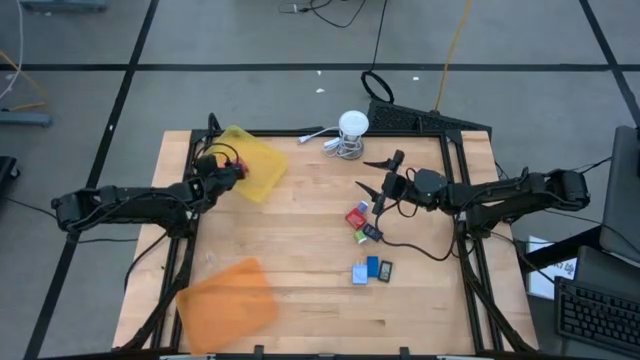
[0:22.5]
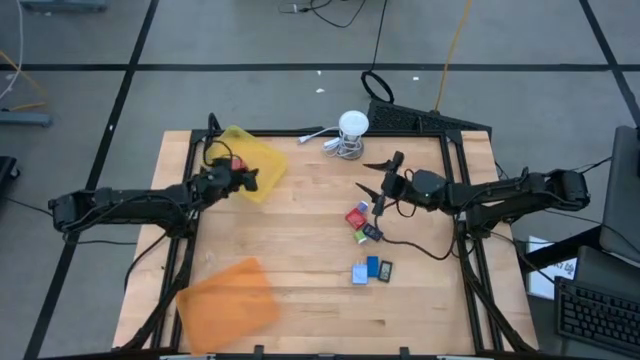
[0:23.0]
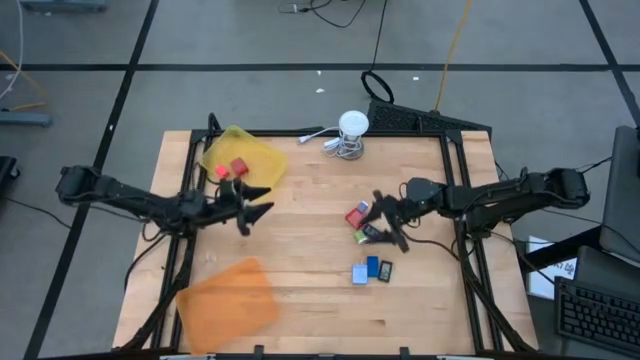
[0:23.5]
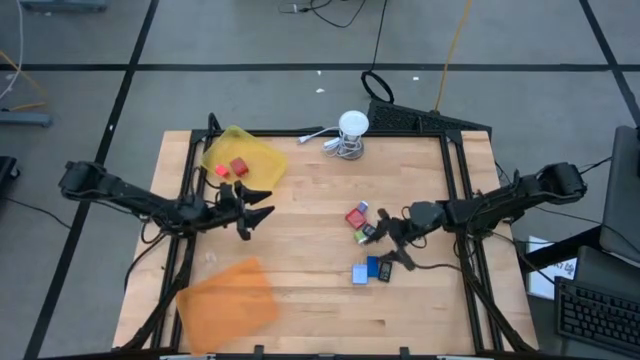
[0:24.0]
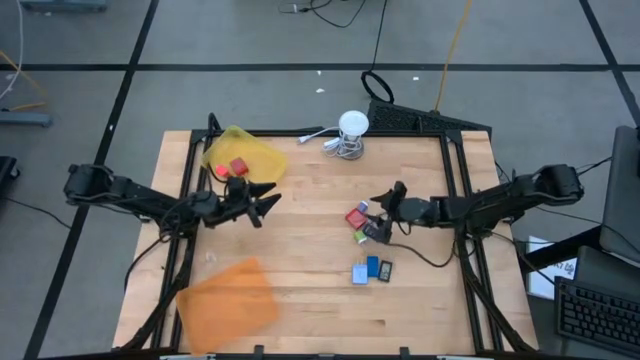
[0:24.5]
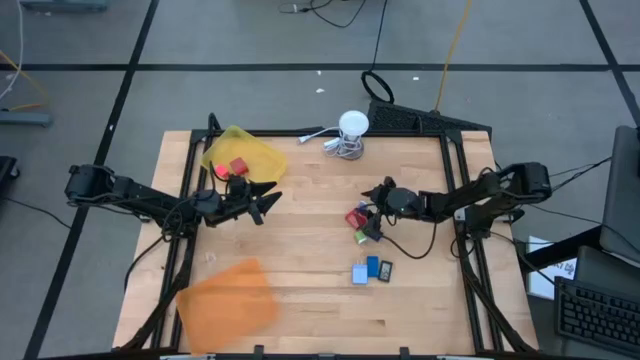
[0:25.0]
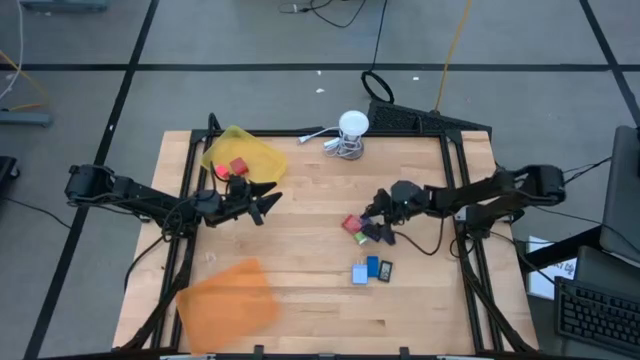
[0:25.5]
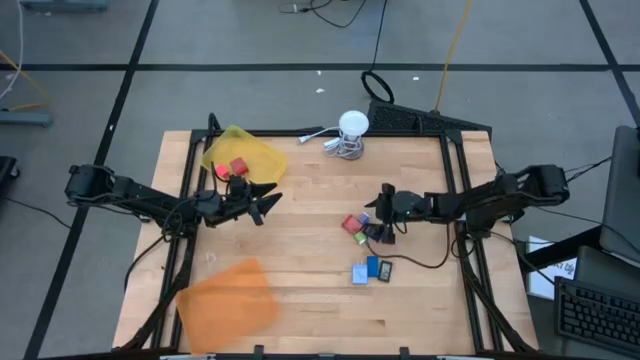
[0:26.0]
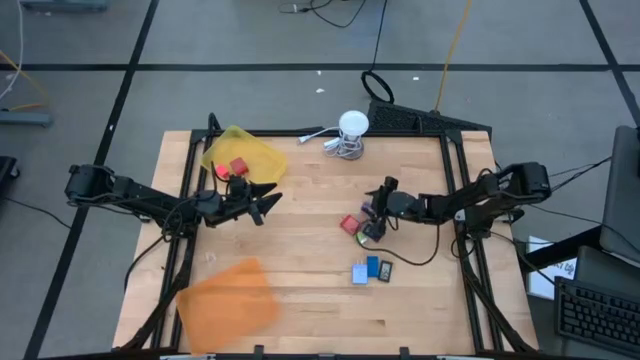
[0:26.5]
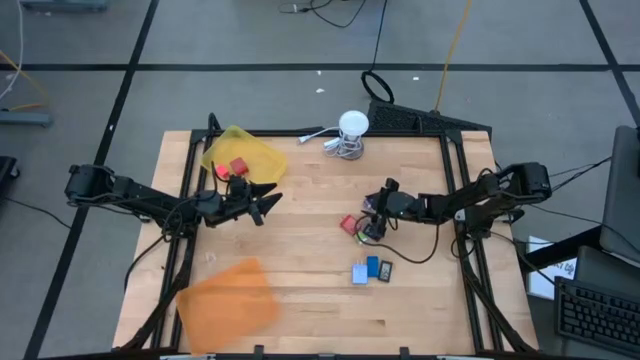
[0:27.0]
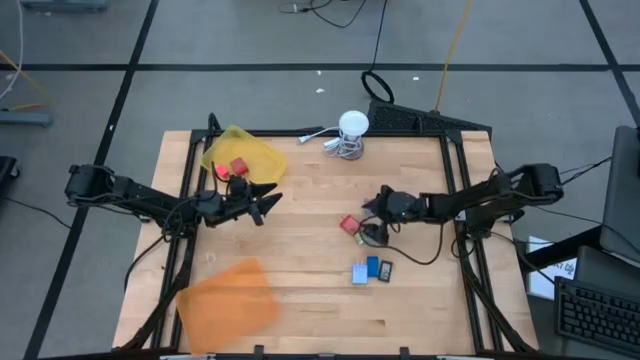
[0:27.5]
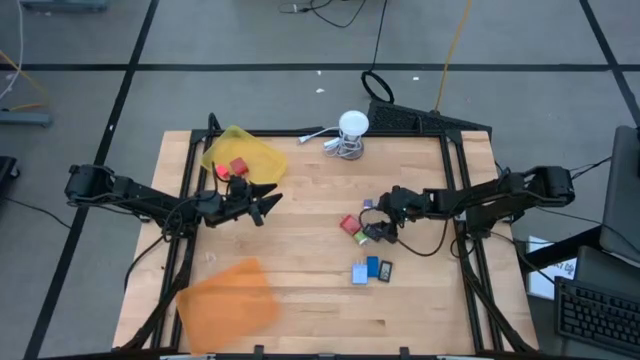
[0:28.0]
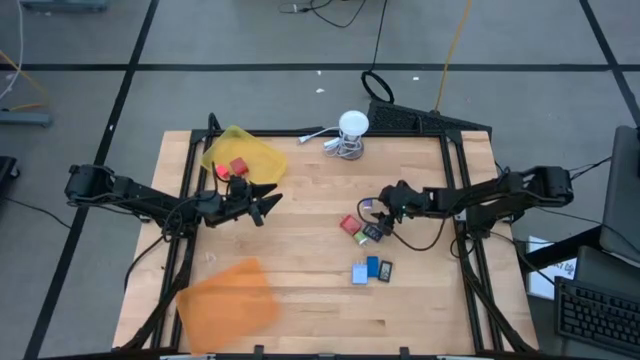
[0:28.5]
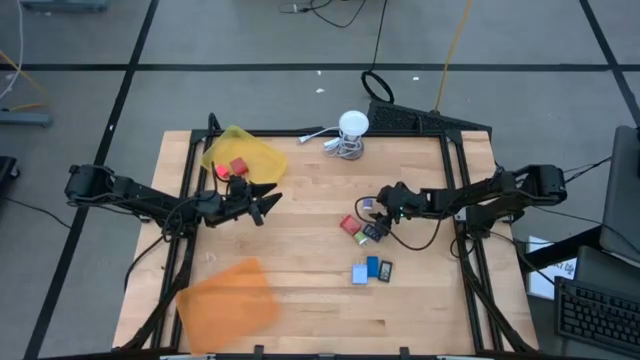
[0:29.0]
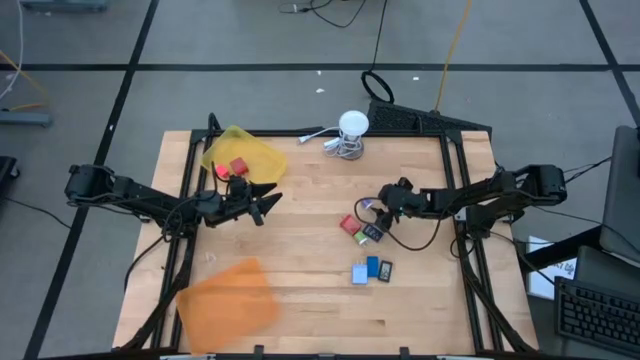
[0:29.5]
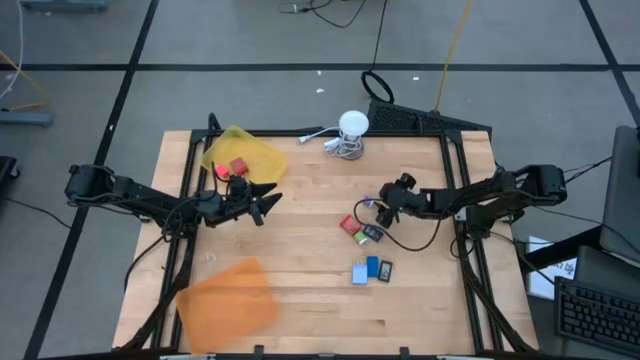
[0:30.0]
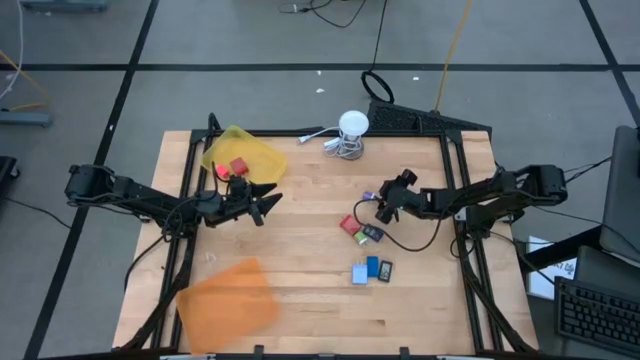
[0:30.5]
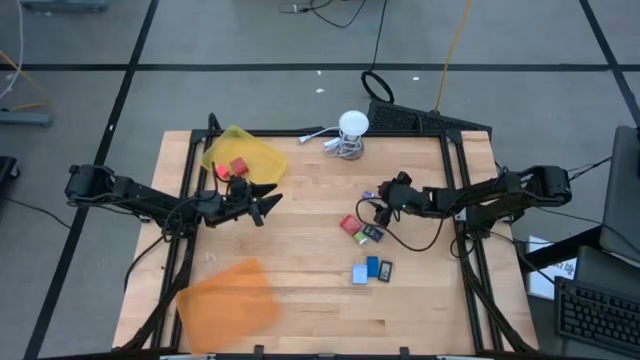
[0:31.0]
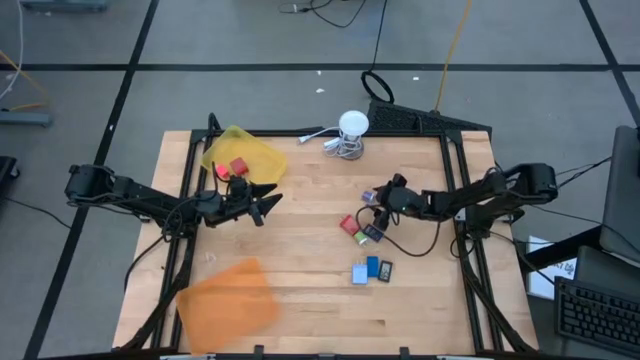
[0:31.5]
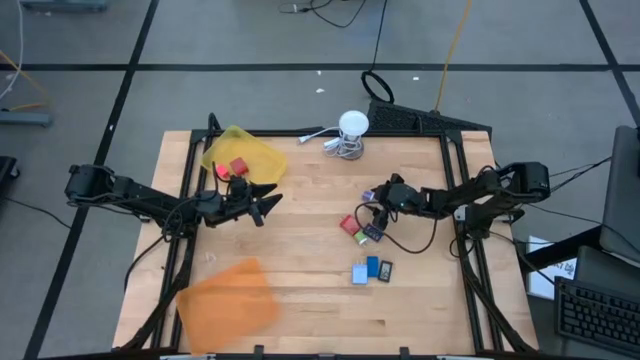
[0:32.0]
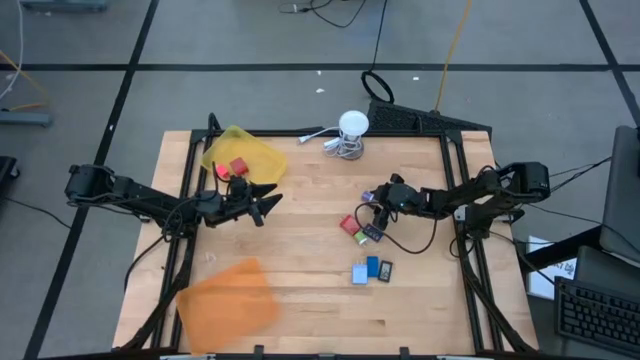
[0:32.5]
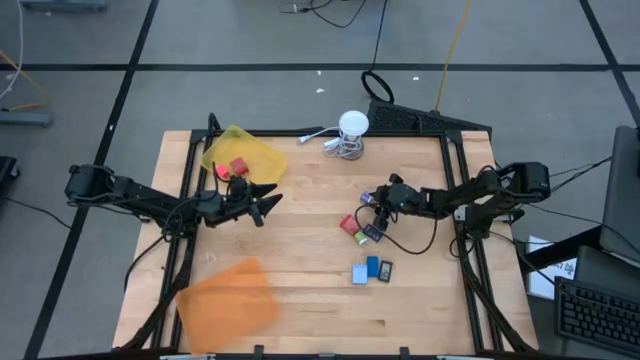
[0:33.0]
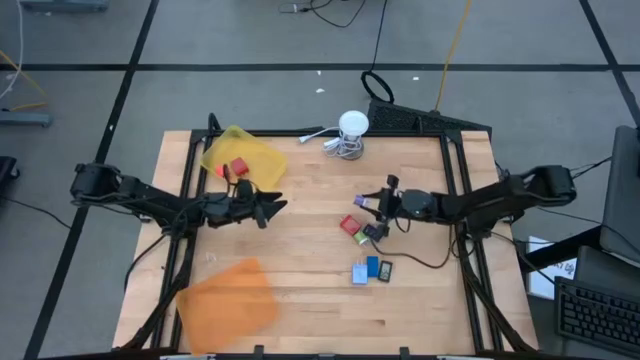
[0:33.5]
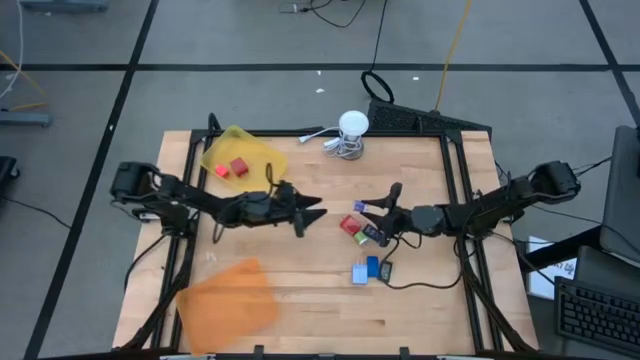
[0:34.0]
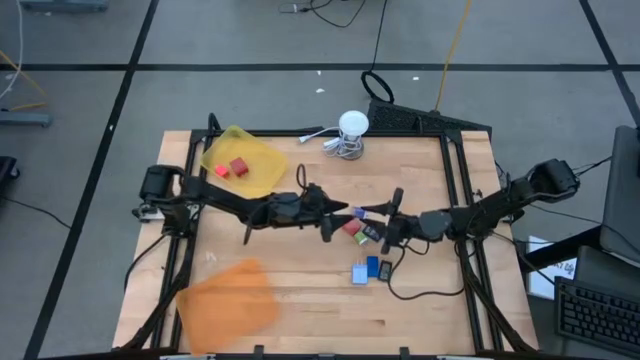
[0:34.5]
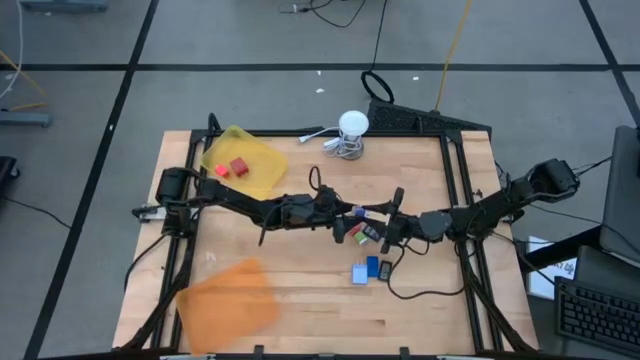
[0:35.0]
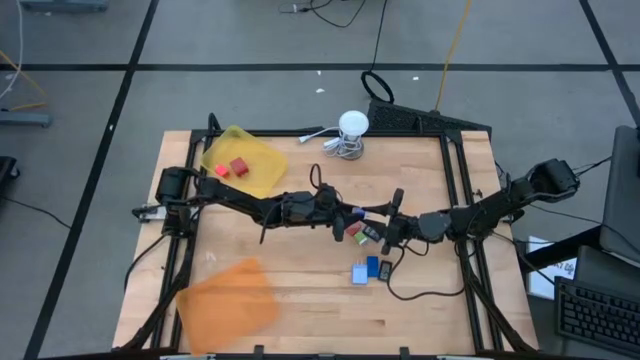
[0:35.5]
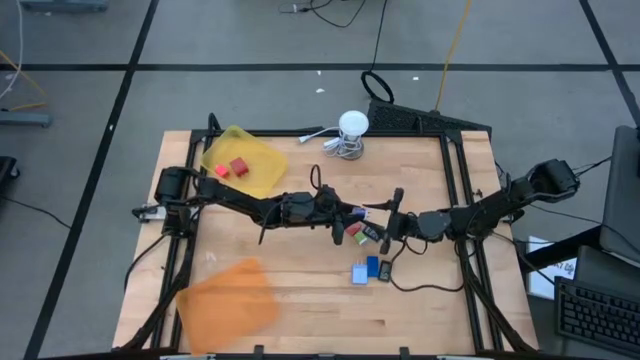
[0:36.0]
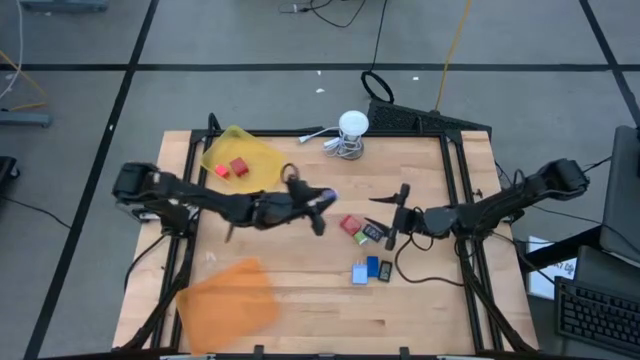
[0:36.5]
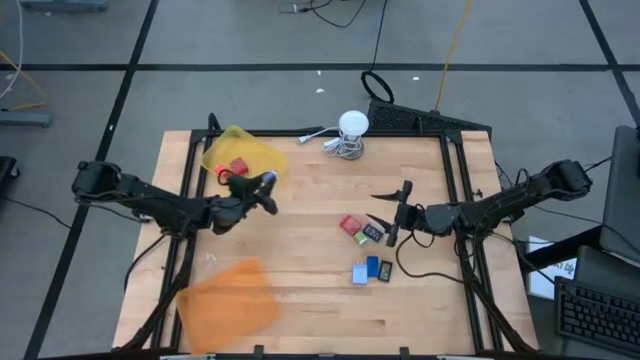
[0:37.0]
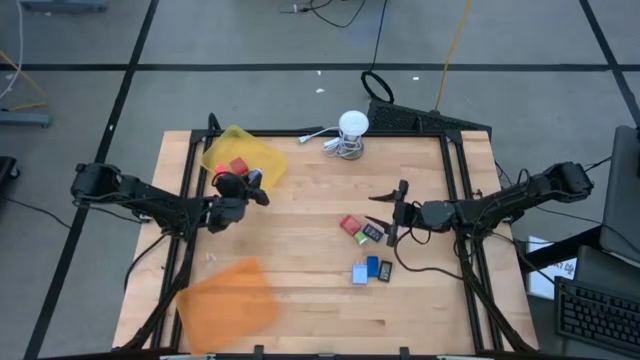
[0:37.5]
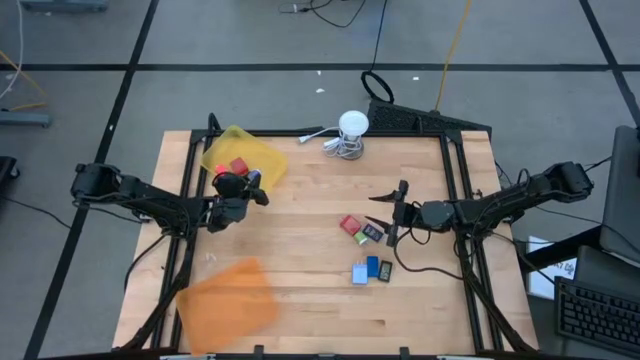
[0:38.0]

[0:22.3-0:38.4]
Task: Pick & Place Office items
Put the violet charger adapter into the yellow bin
